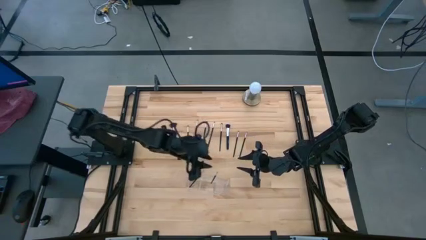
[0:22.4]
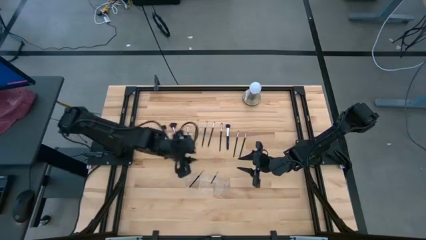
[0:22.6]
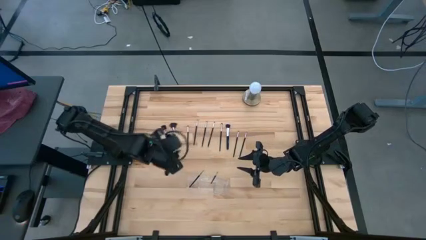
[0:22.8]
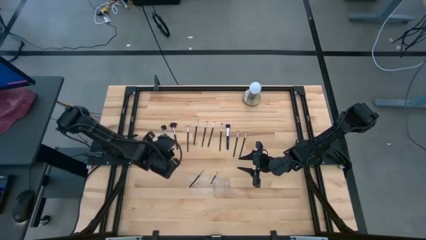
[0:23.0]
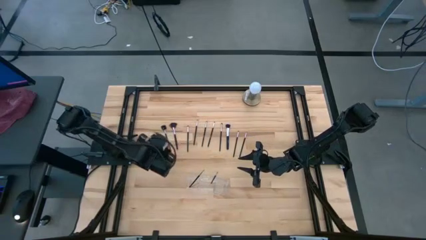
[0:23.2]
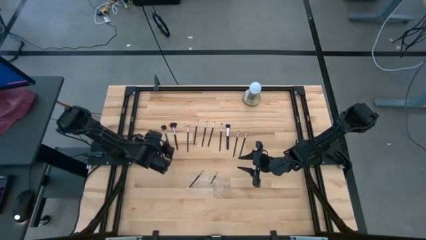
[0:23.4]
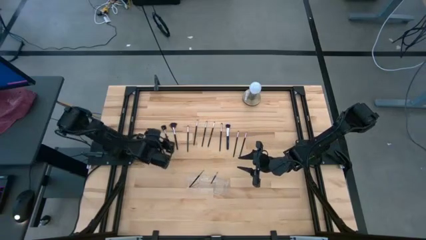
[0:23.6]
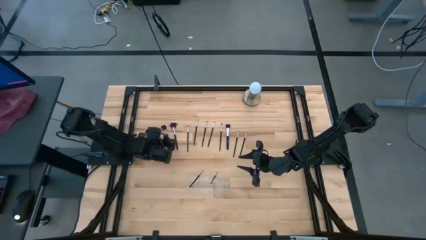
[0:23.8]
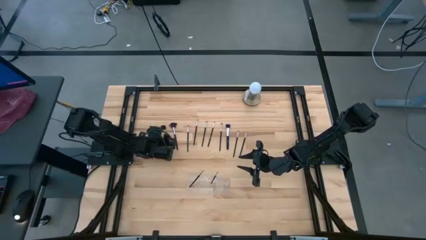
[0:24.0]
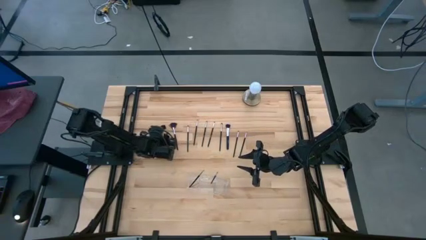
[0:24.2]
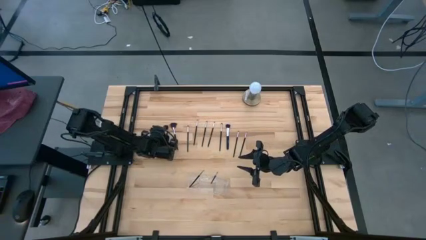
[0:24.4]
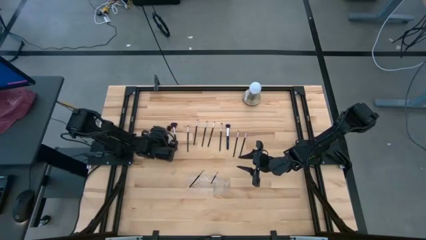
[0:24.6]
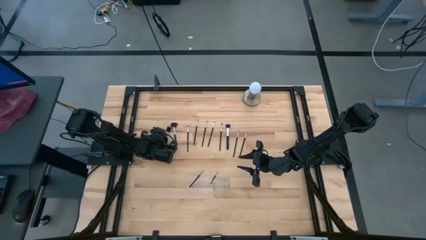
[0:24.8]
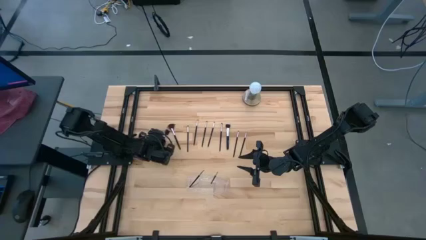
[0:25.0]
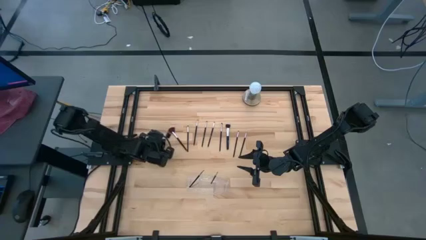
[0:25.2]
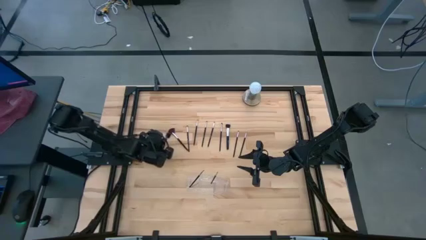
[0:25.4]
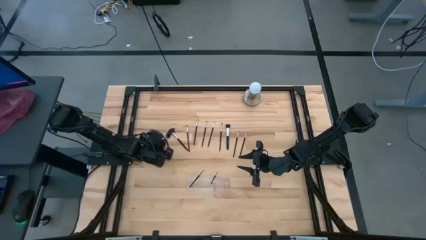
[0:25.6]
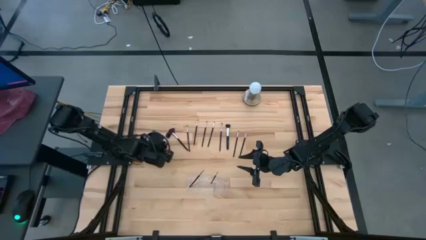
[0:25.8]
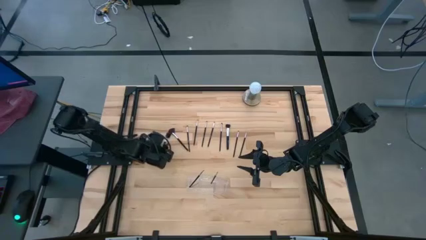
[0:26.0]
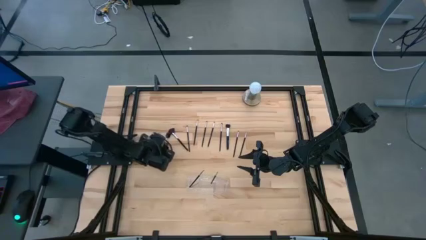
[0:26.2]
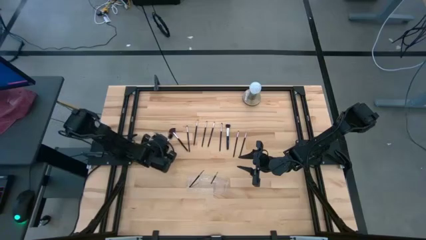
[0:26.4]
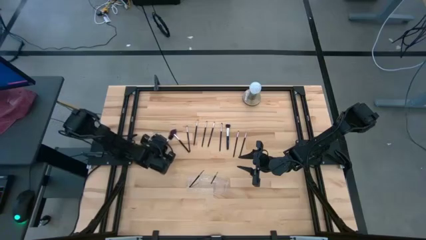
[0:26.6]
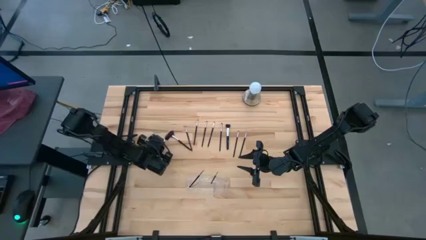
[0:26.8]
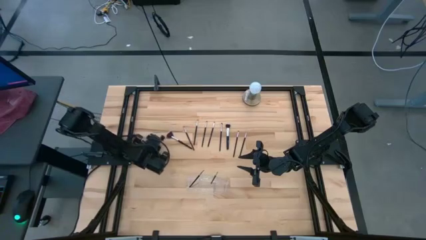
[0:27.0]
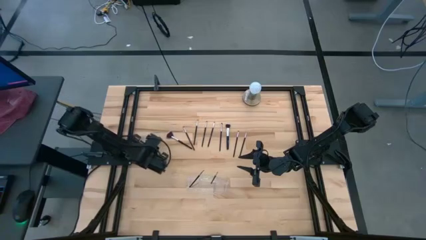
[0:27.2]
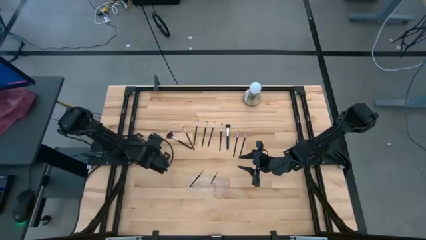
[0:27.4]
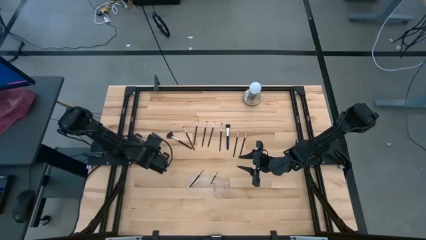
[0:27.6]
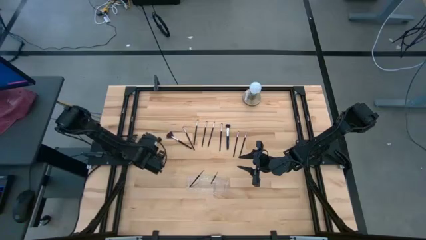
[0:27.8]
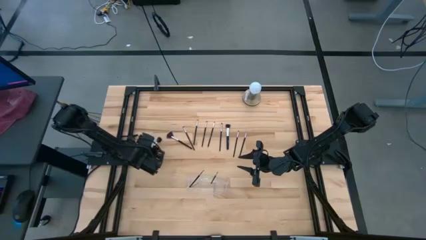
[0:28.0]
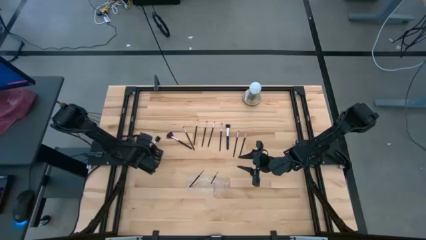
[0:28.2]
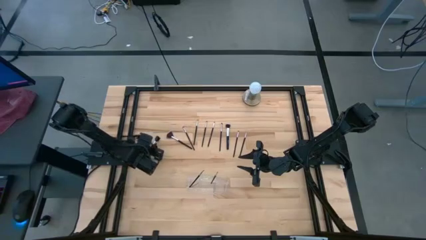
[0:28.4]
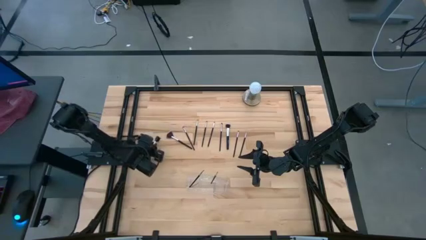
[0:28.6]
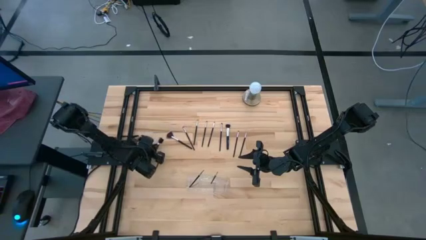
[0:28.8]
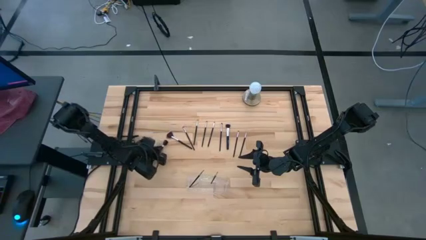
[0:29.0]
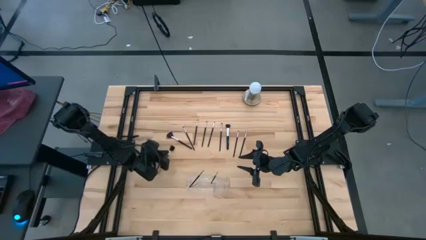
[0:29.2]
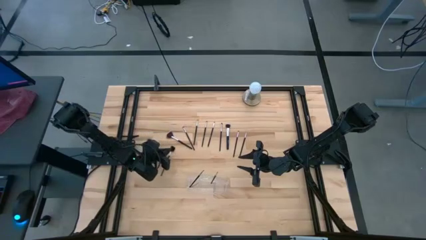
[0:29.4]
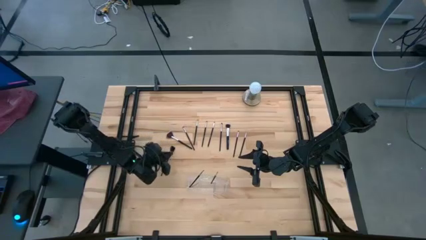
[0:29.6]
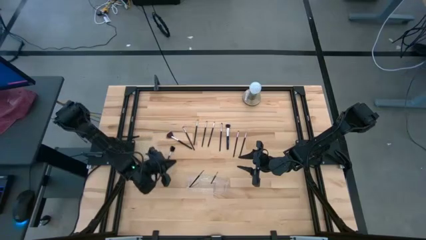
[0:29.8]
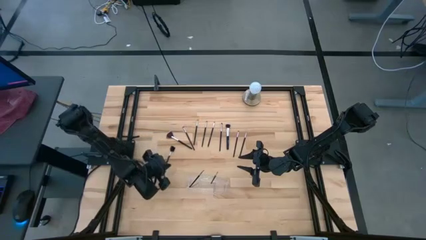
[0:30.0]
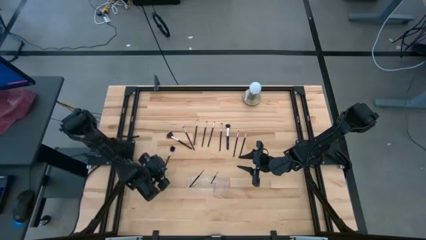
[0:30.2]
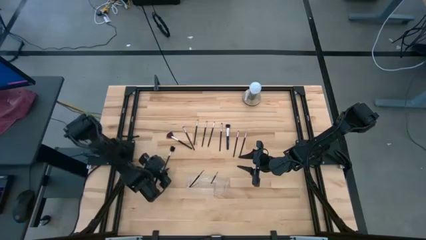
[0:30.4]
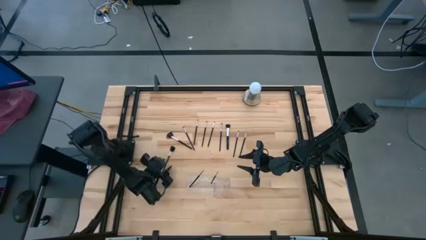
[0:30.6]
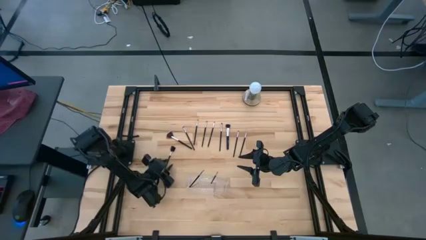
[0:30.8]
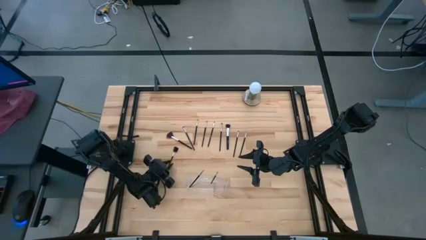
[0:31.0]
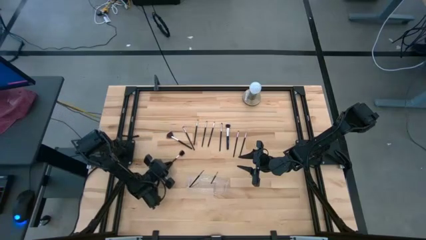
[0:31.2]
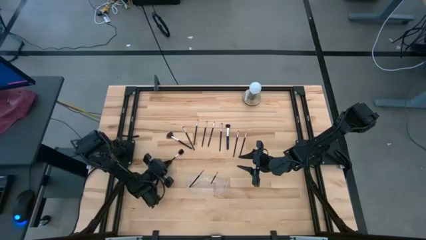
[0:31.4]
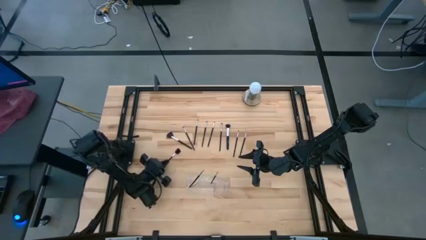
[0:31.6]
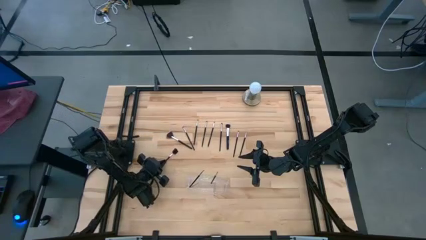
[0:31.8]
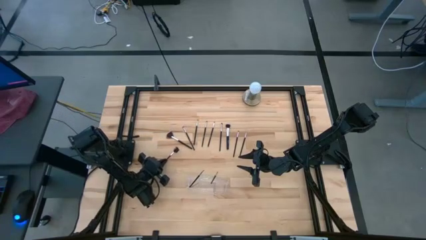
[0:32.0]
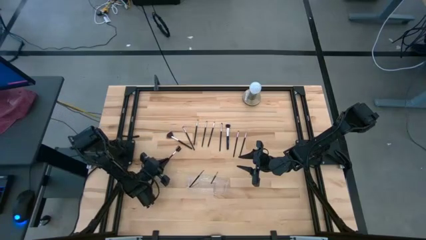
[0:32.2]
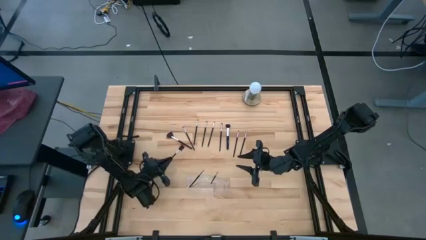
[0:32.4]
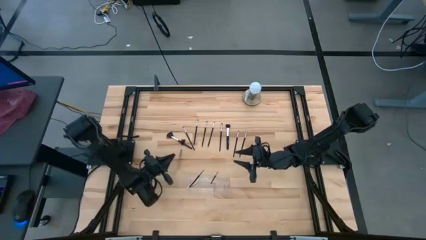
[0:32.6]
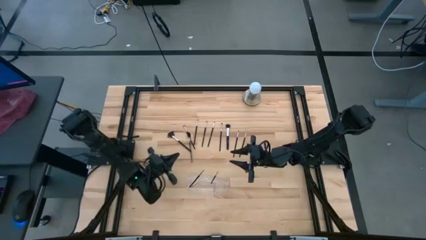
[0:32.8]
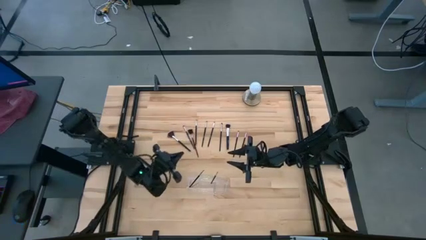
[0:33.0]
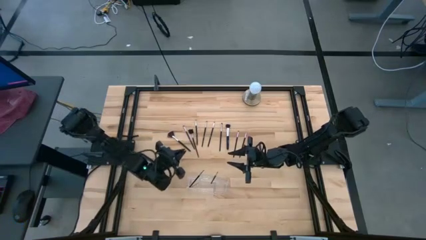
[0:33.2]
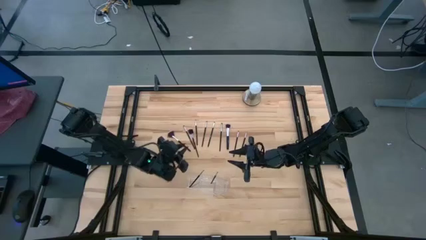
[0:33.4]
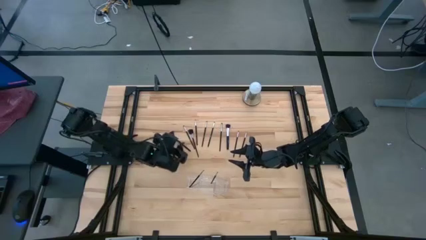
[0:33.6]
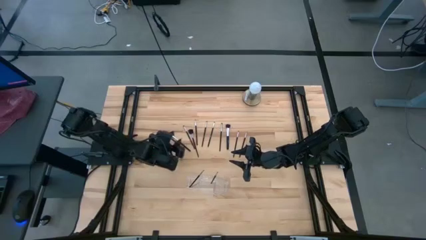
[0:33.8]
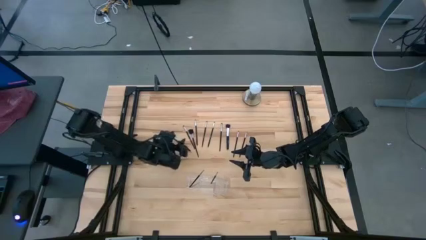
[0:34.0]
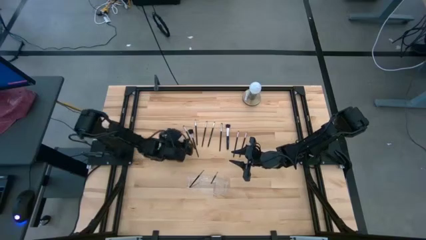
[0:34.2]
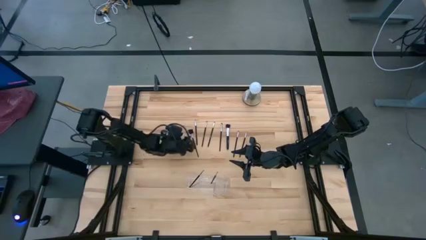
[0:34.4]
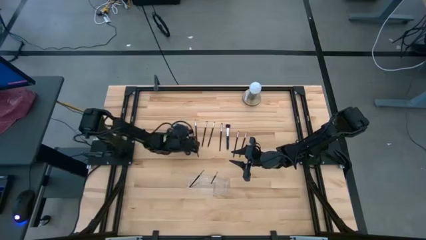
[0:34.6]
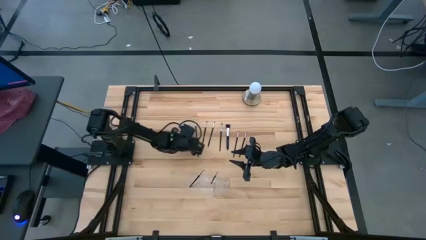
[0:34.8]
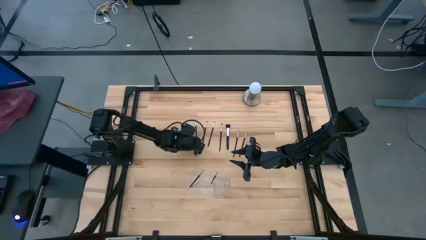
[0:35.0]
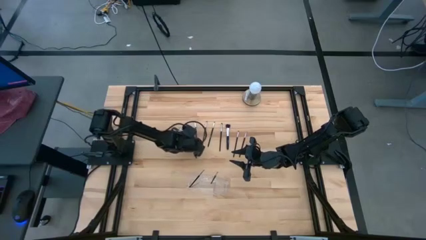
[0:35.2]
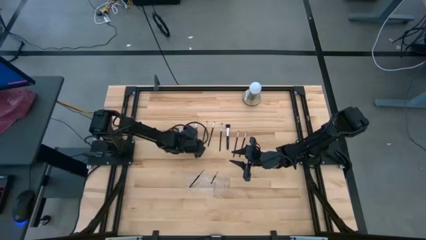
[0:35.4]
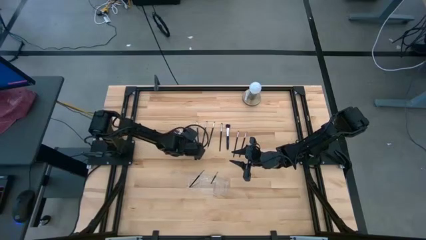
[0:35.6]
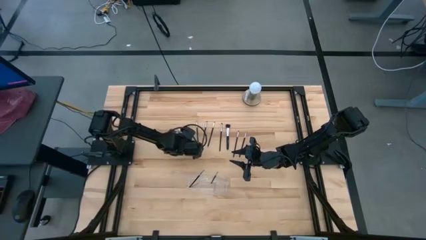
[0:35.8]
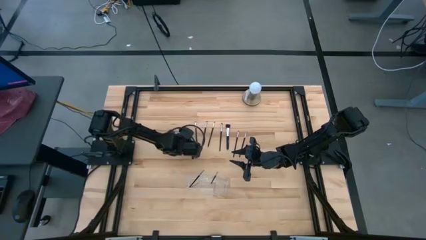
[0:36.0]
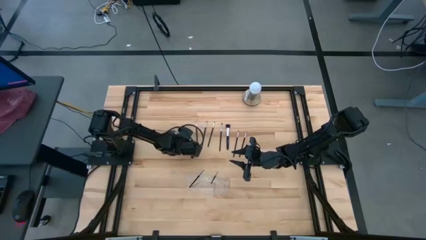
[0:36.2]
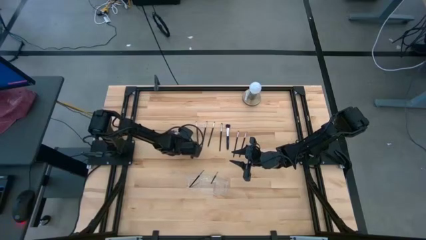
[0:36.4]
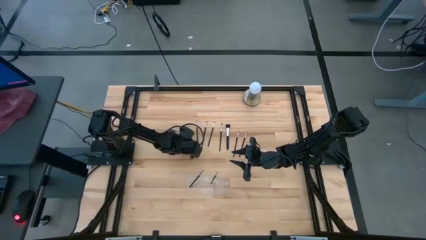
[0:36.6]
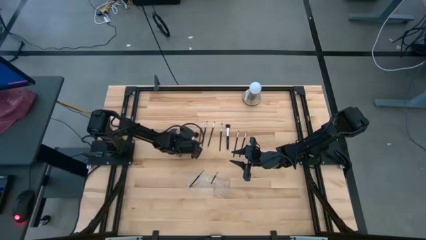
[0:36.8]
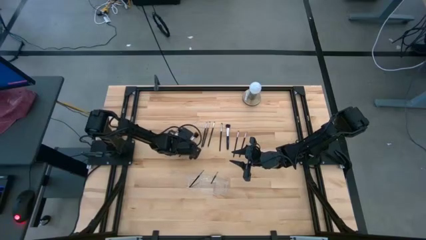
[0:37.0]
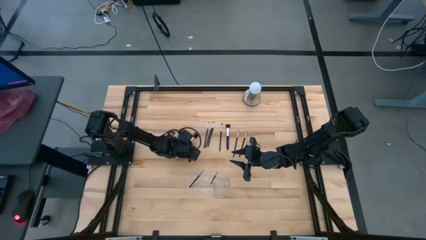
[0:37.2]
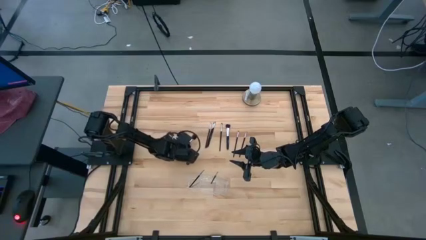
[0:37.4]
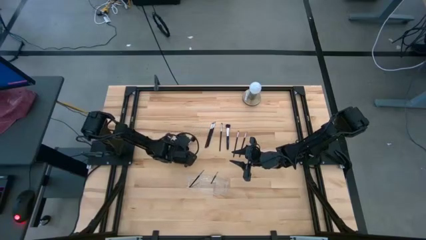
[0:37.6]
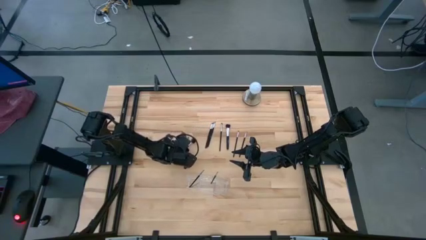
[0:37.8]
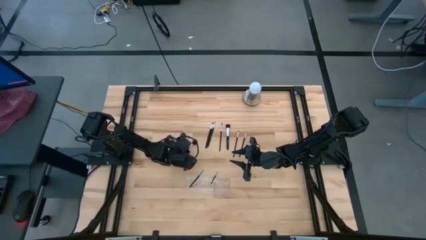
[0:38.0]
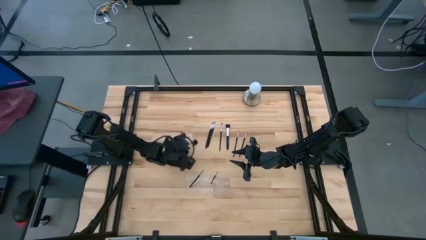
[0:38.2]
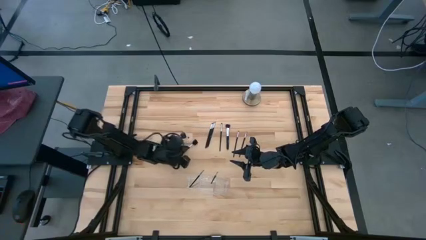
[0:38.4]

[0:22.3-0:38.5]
Task: Put items in baskets/containers
Put the black brow brush into the transparent organizer
